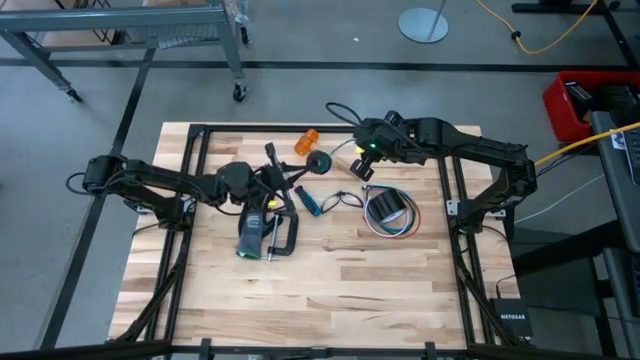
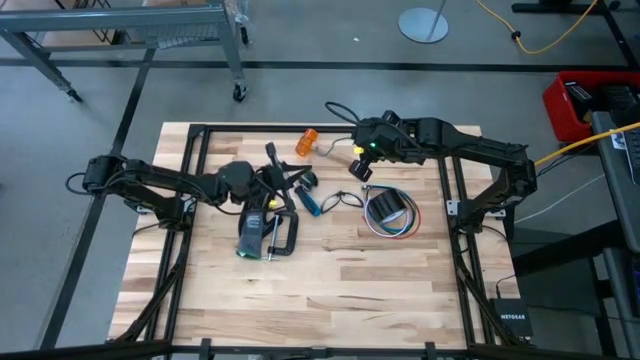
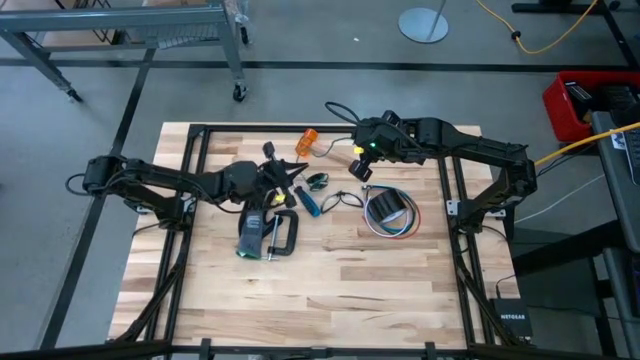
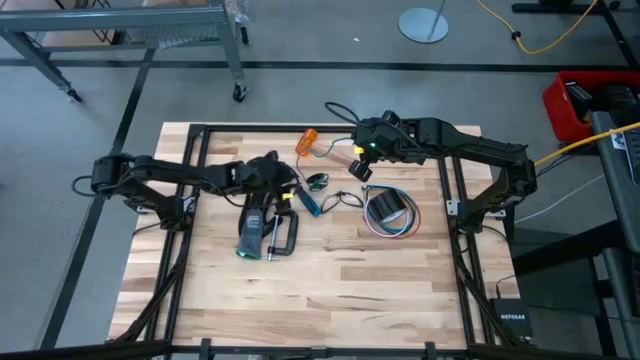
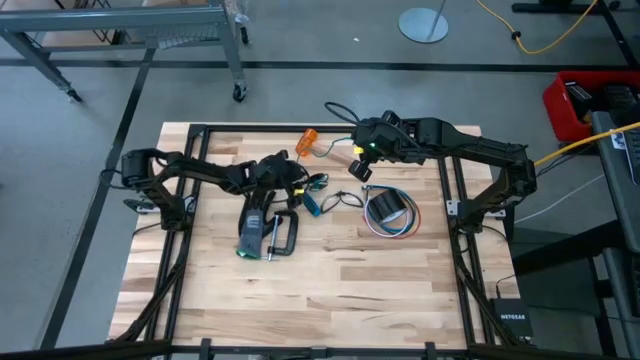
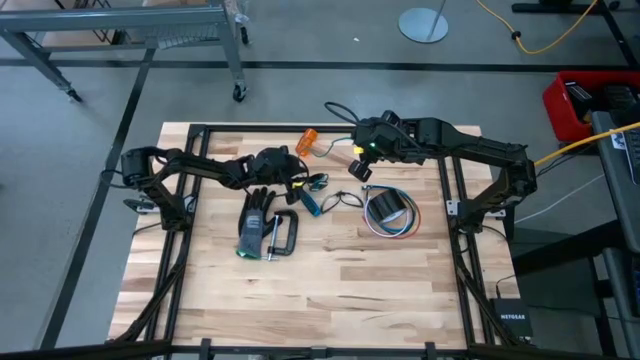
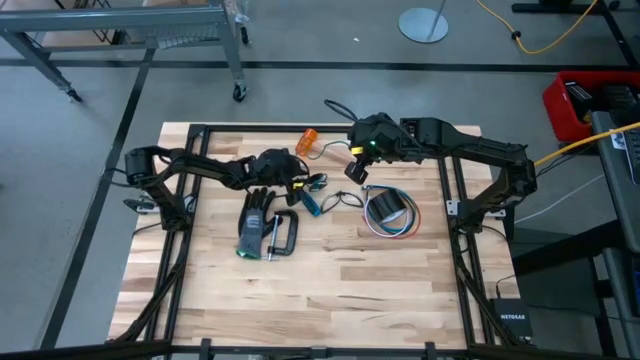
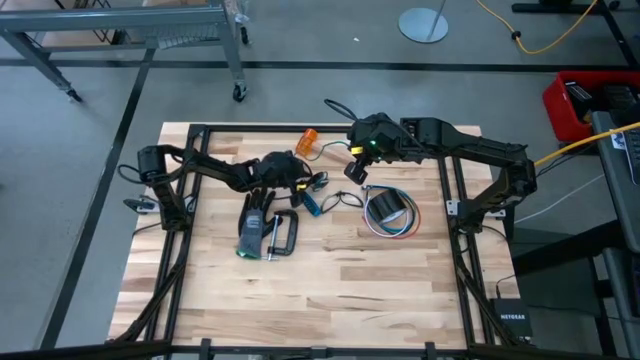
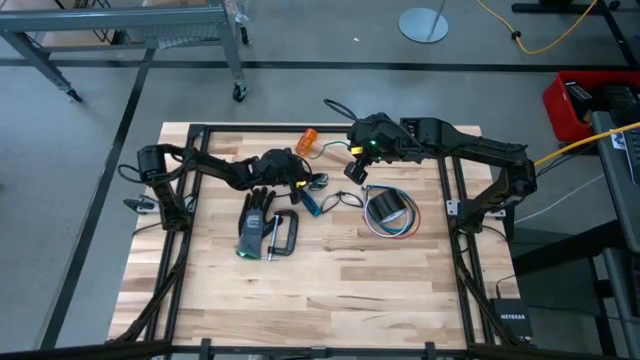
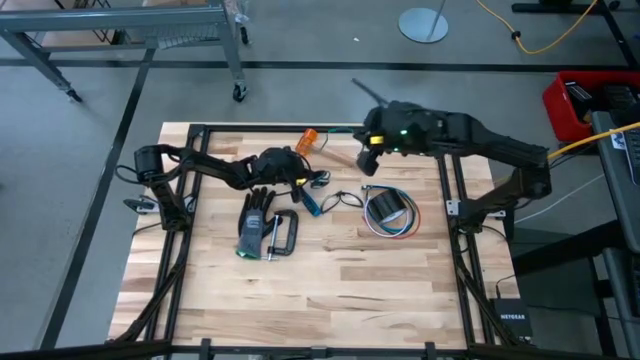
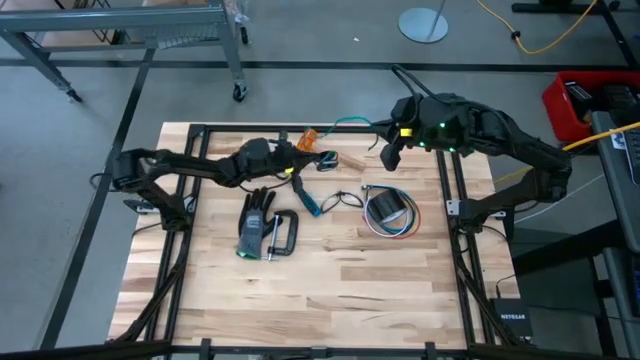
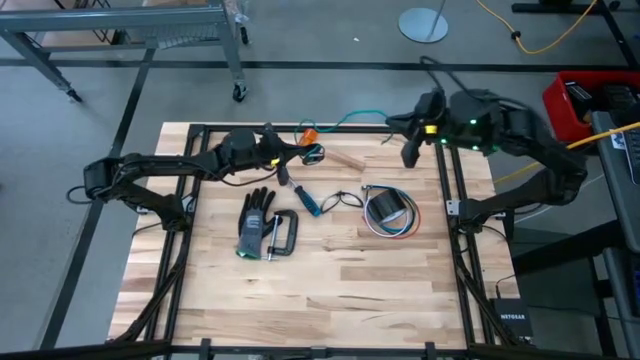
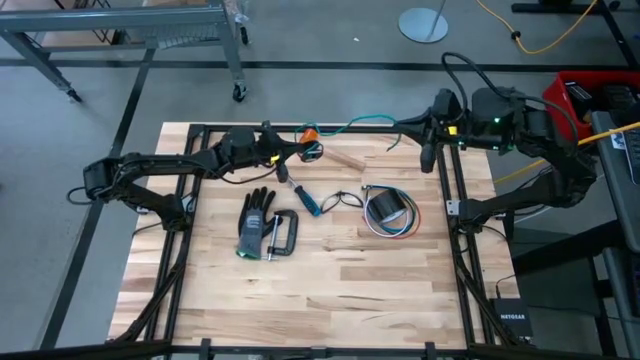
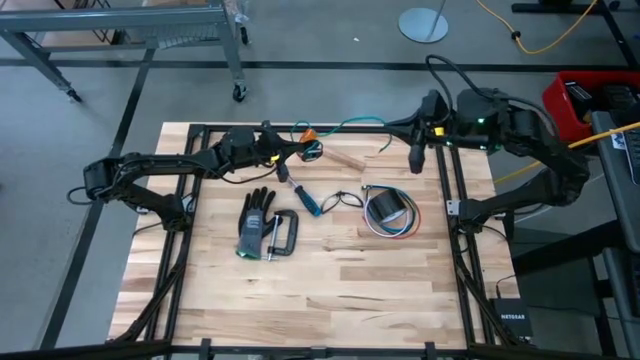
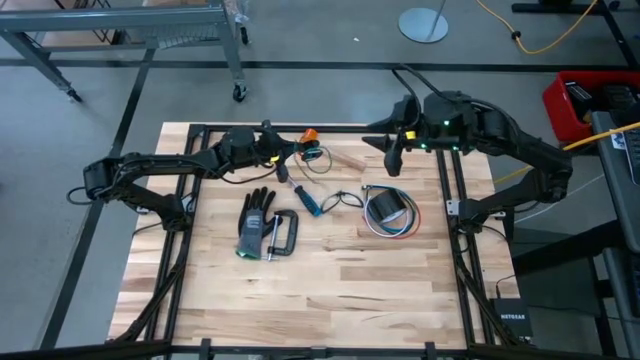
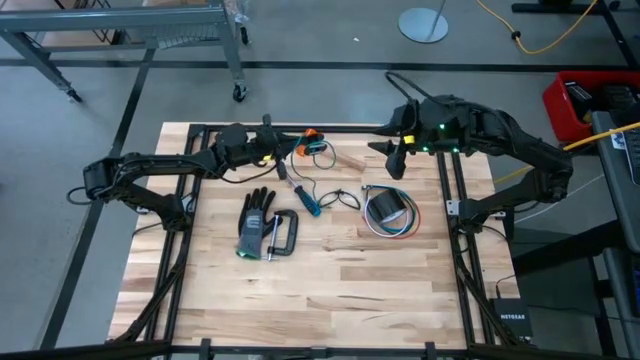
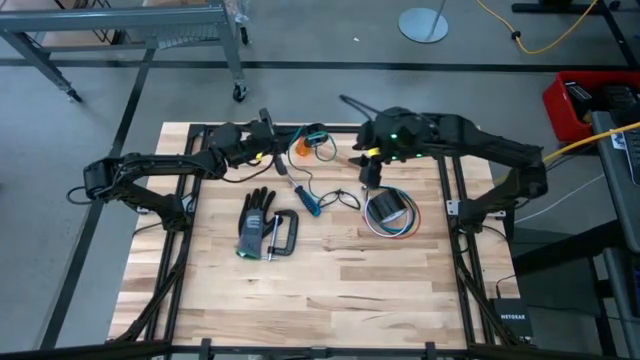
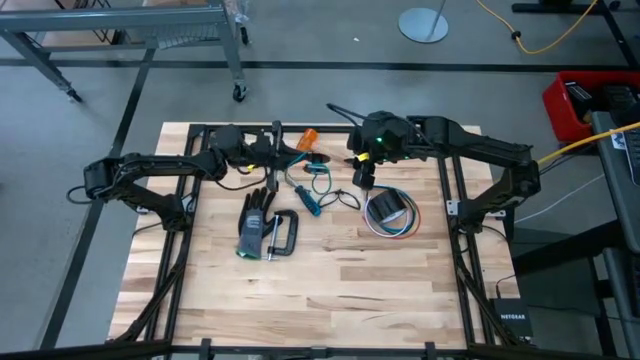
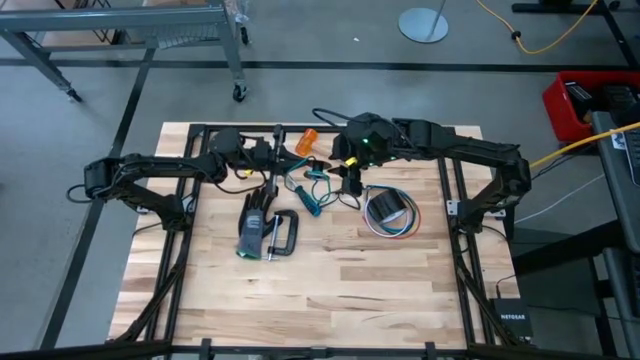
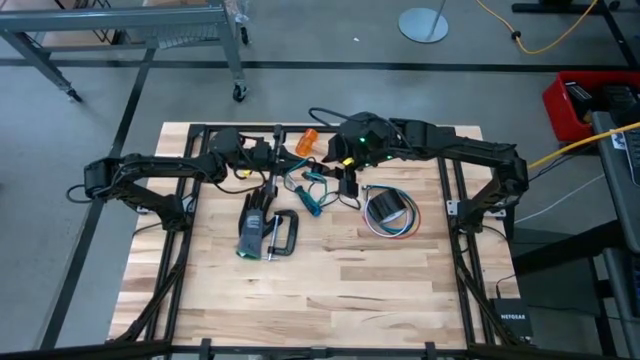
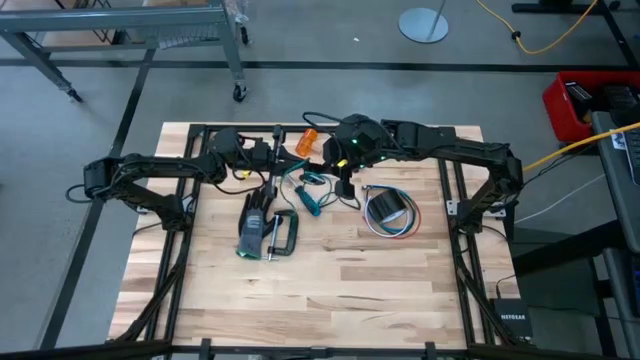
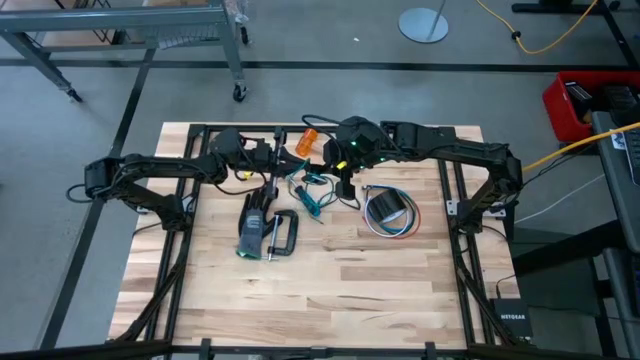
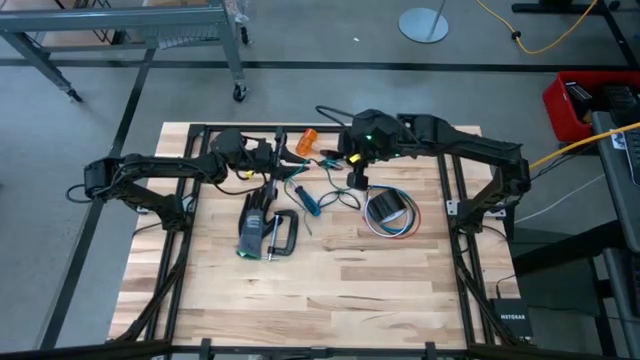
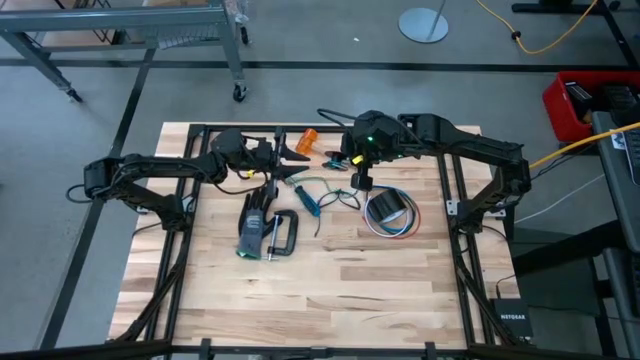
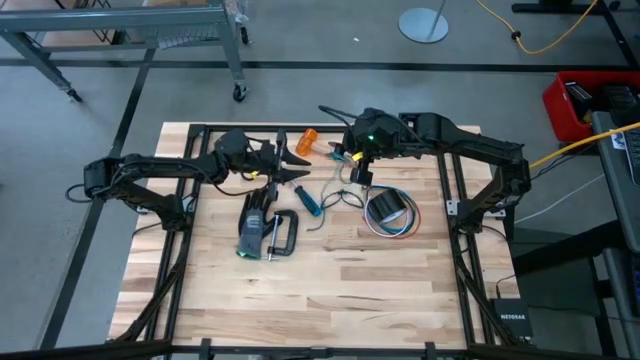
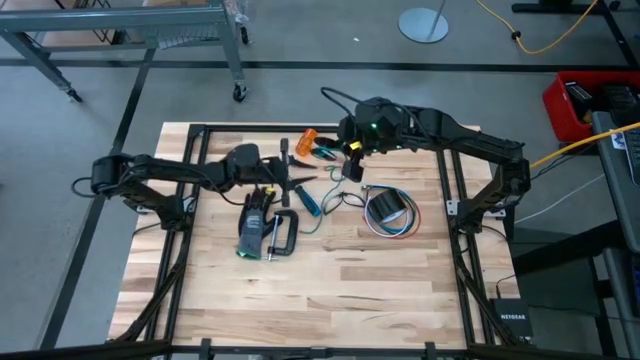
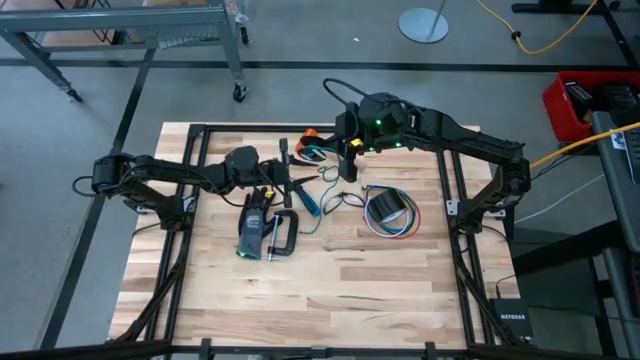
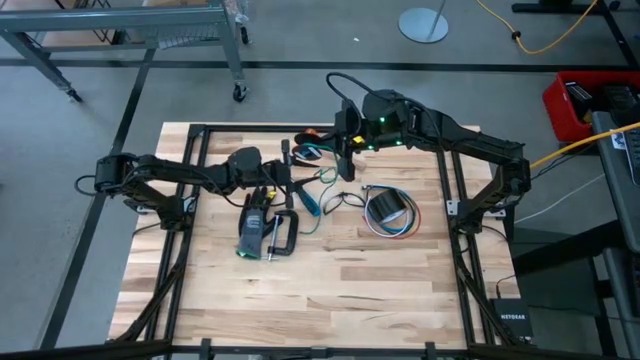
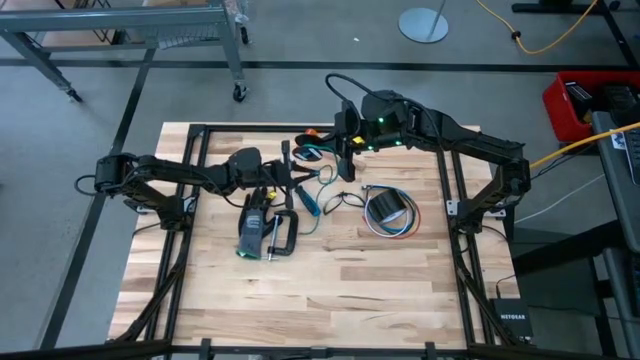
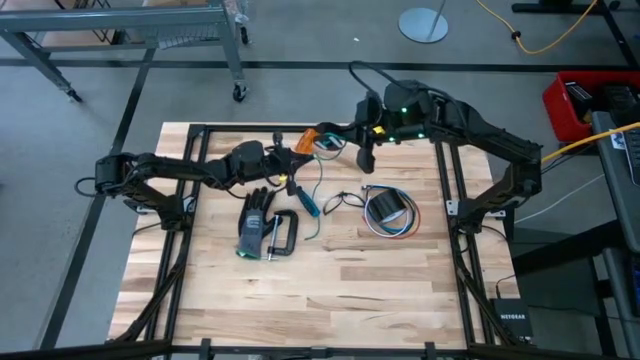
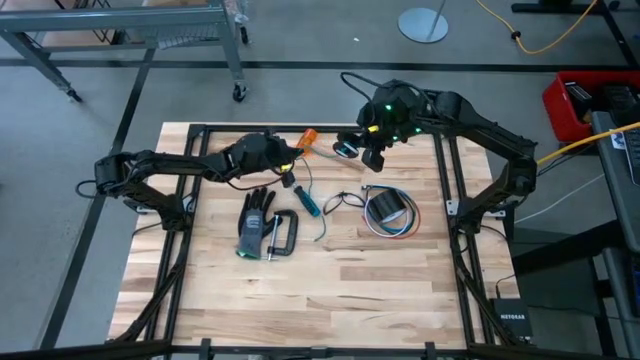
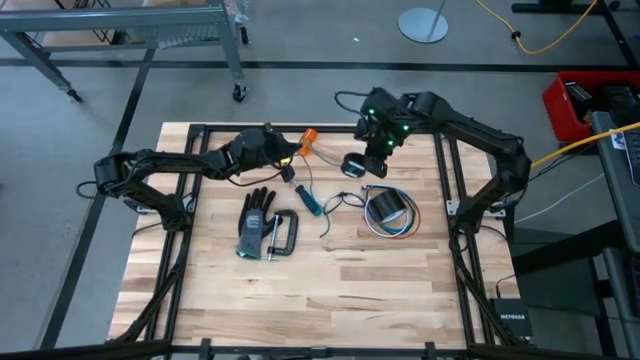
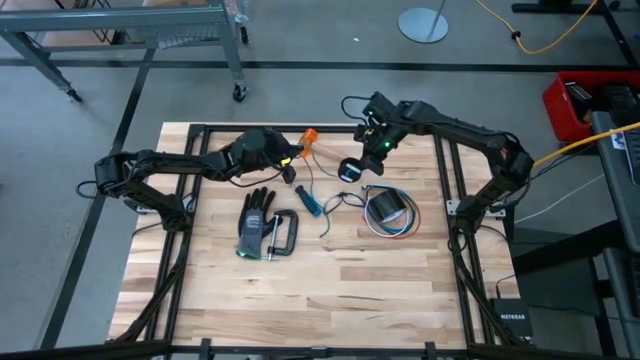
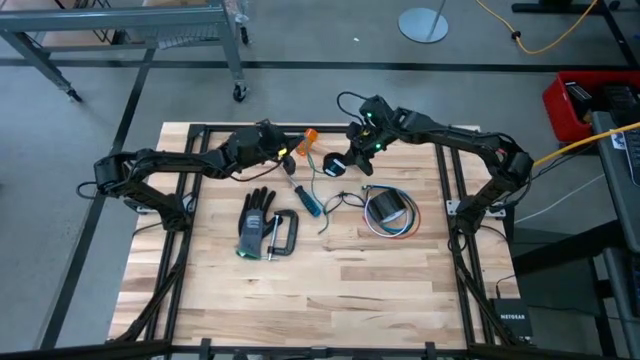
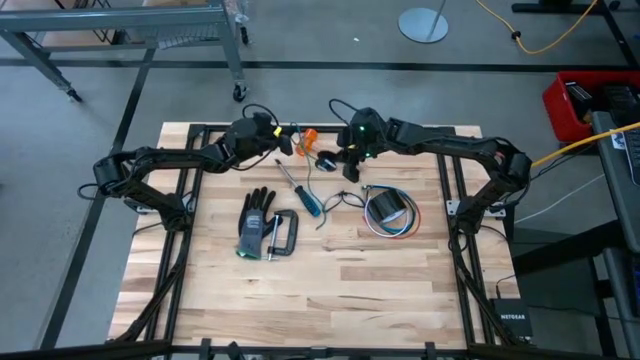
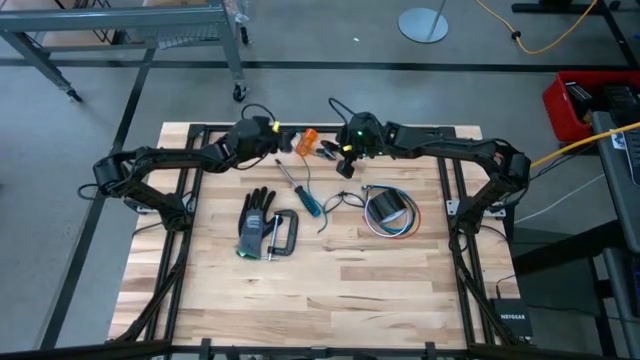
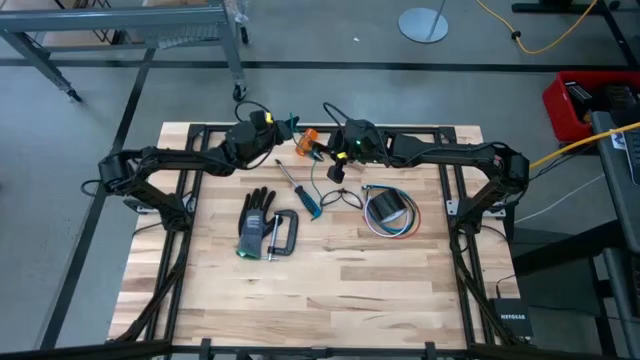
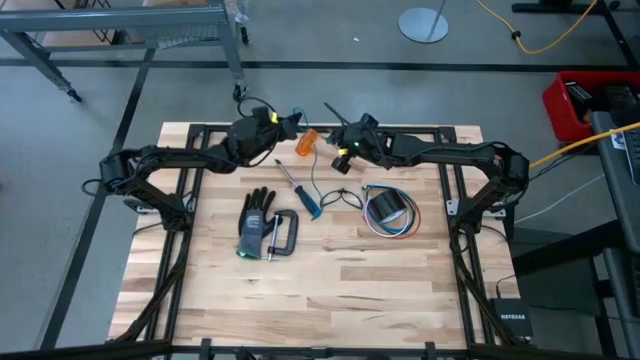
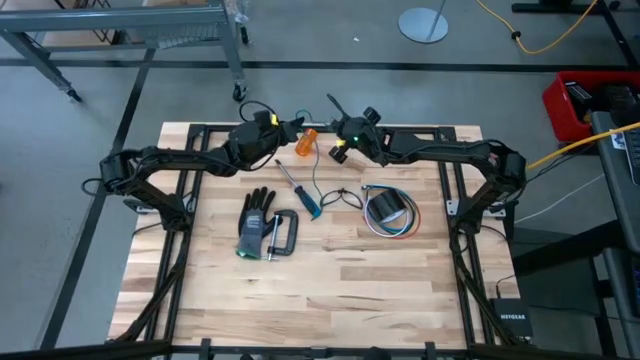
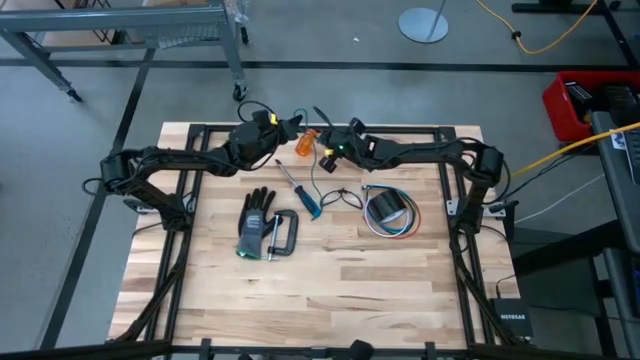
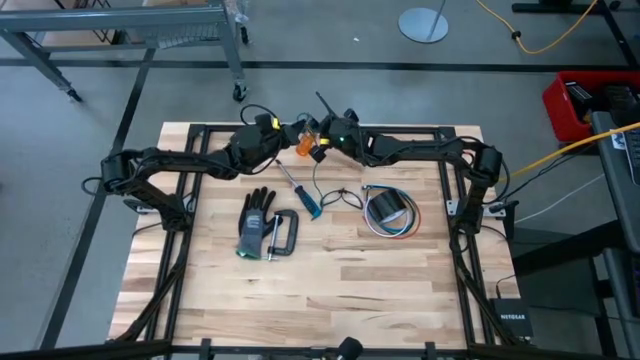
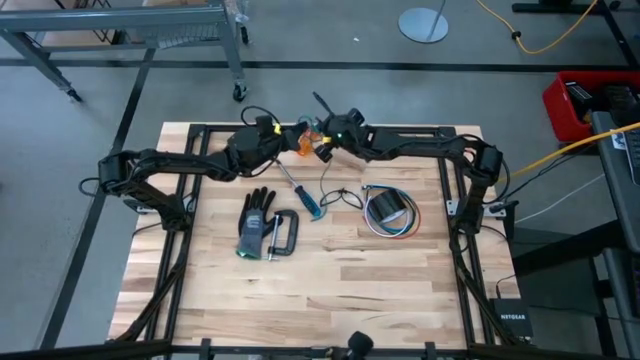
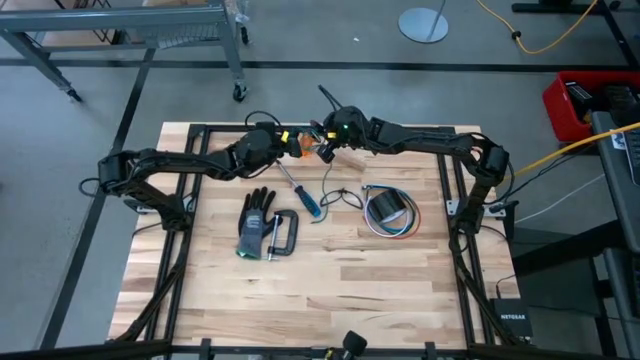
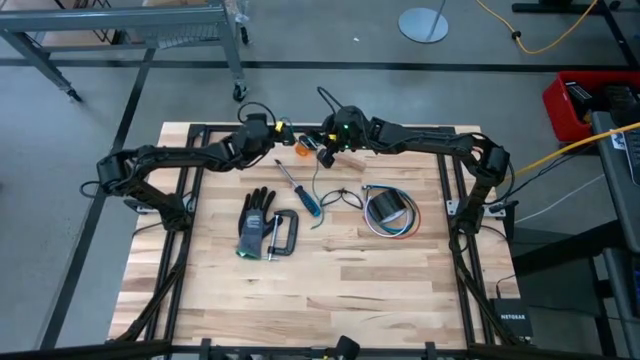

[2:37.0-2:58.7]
Task: Coil cords
Coil the green wire onto the spool
